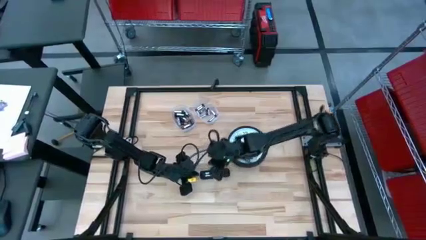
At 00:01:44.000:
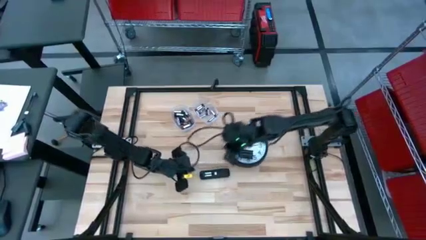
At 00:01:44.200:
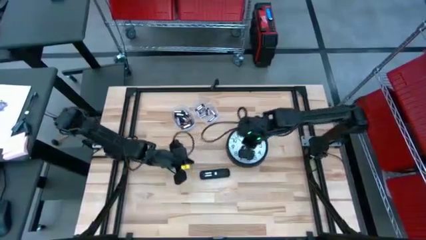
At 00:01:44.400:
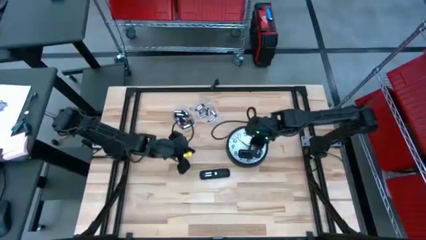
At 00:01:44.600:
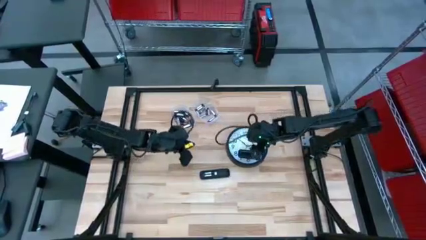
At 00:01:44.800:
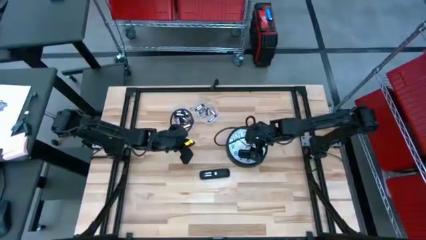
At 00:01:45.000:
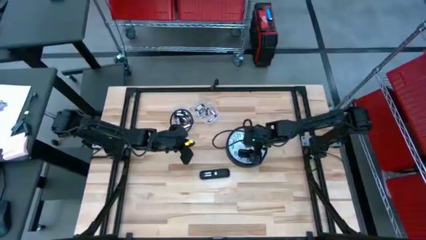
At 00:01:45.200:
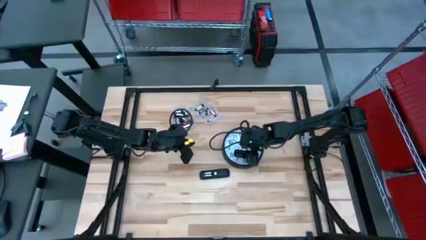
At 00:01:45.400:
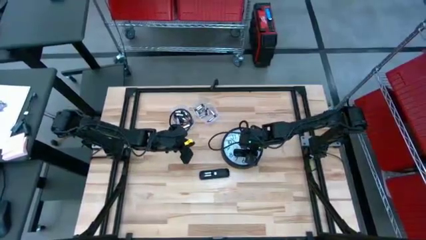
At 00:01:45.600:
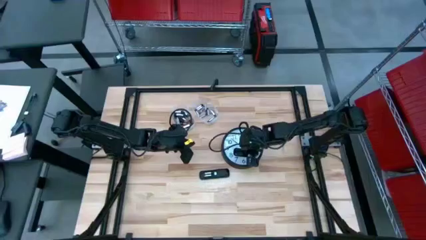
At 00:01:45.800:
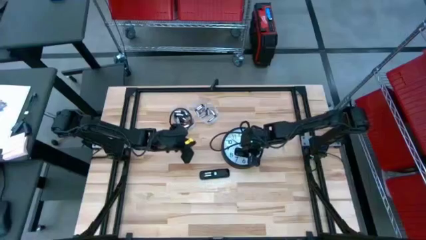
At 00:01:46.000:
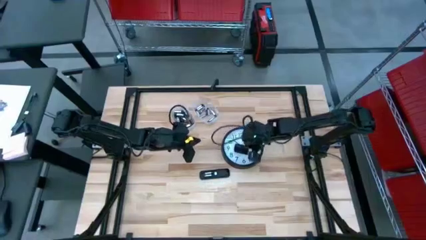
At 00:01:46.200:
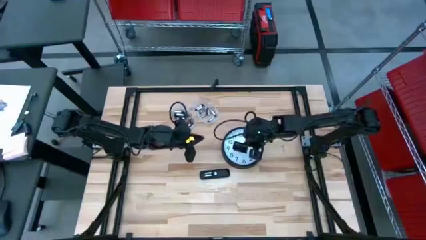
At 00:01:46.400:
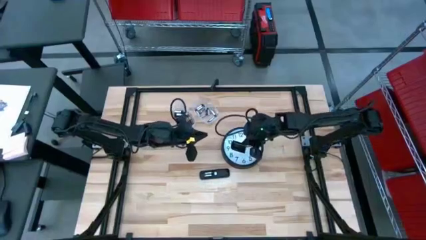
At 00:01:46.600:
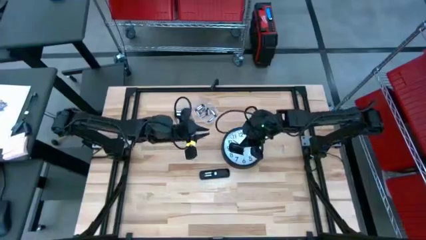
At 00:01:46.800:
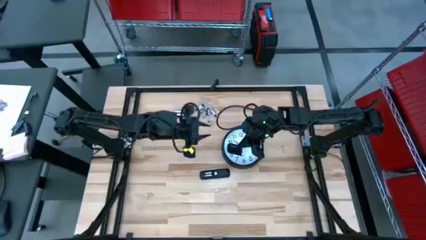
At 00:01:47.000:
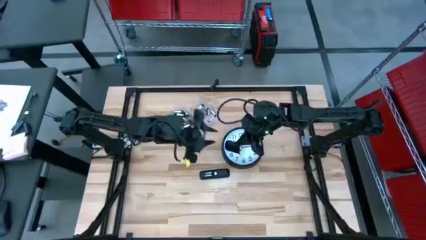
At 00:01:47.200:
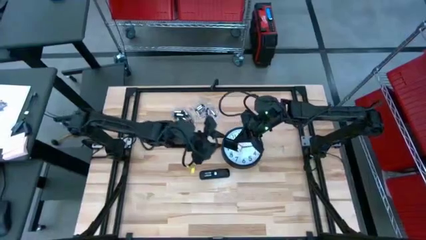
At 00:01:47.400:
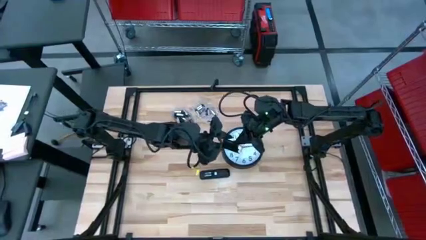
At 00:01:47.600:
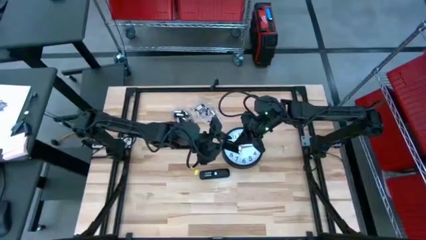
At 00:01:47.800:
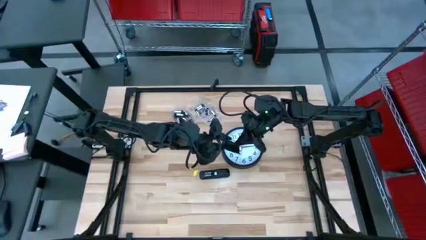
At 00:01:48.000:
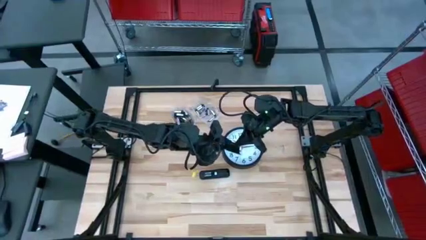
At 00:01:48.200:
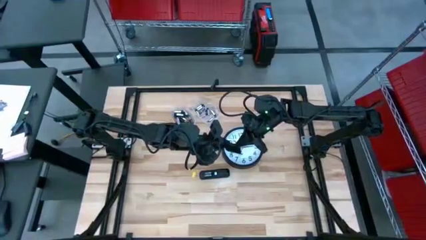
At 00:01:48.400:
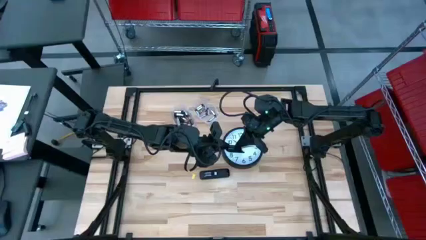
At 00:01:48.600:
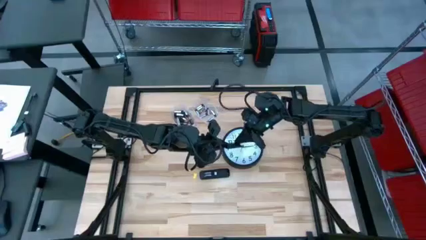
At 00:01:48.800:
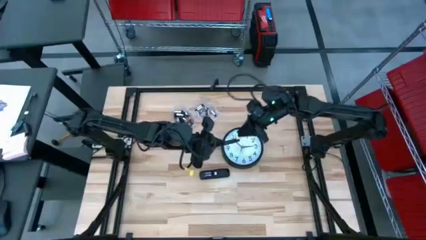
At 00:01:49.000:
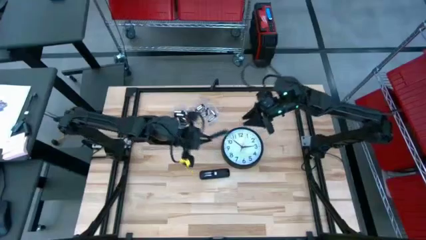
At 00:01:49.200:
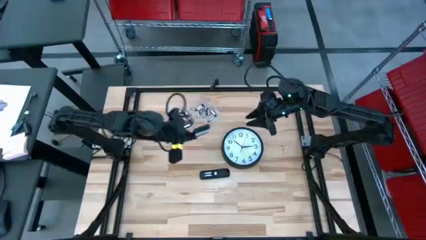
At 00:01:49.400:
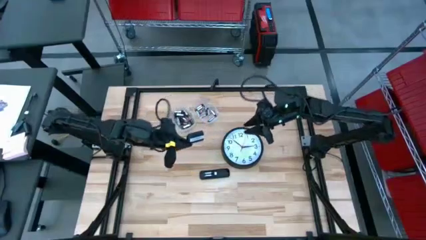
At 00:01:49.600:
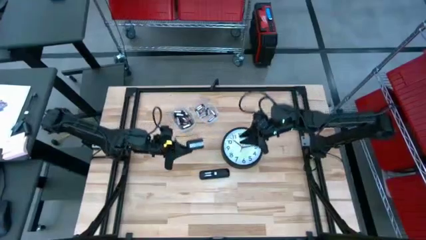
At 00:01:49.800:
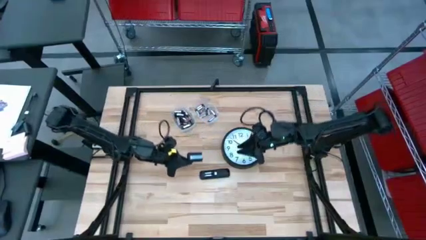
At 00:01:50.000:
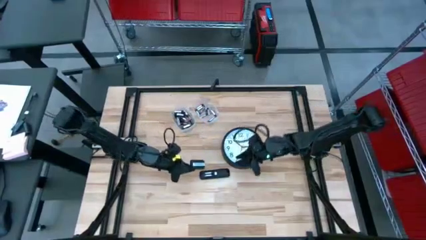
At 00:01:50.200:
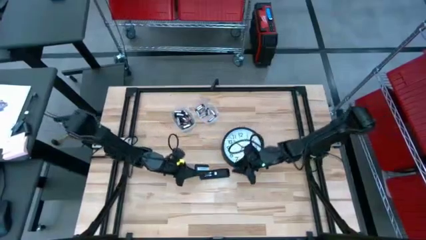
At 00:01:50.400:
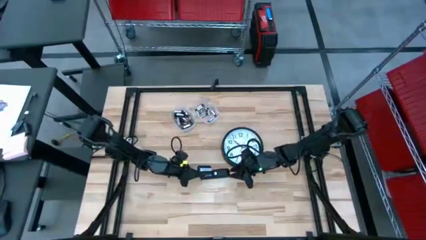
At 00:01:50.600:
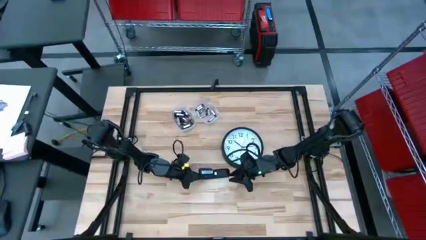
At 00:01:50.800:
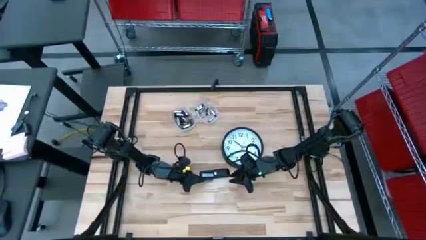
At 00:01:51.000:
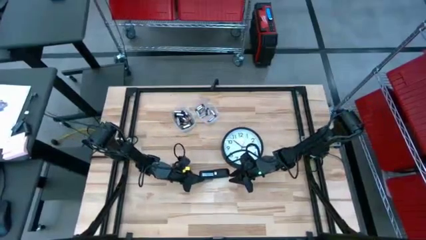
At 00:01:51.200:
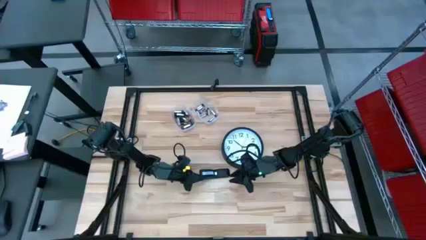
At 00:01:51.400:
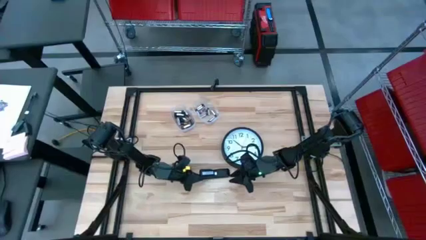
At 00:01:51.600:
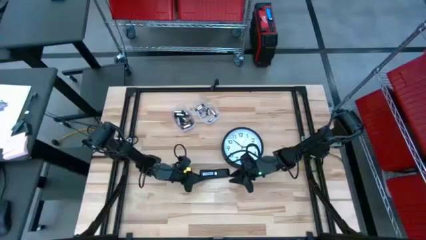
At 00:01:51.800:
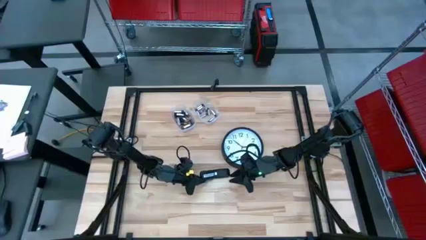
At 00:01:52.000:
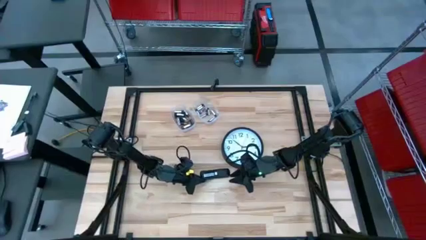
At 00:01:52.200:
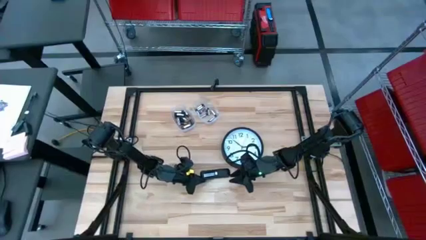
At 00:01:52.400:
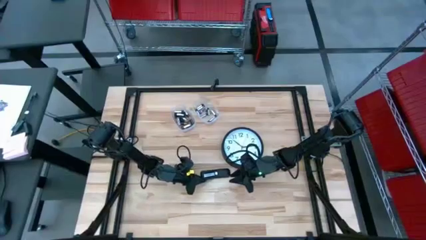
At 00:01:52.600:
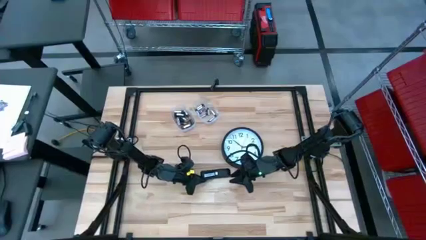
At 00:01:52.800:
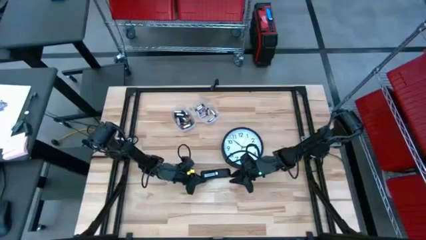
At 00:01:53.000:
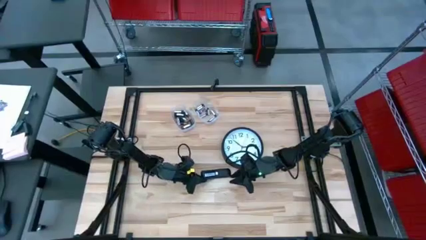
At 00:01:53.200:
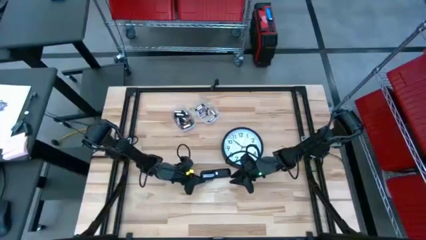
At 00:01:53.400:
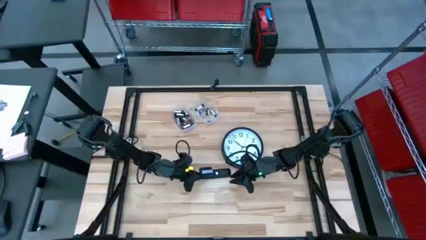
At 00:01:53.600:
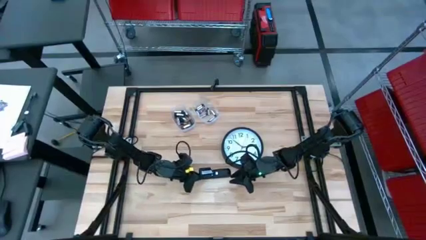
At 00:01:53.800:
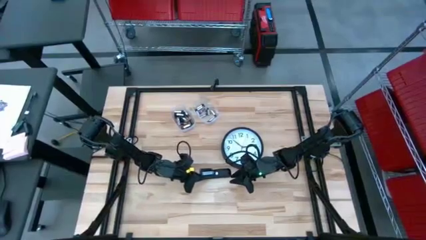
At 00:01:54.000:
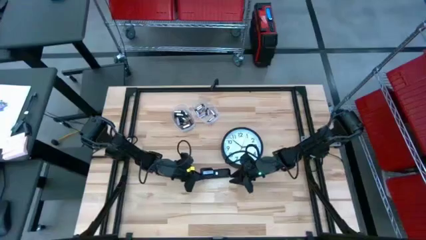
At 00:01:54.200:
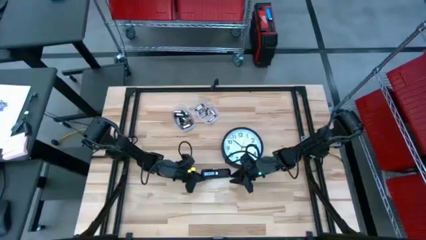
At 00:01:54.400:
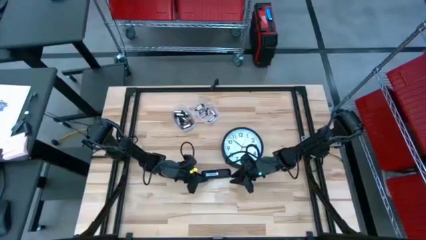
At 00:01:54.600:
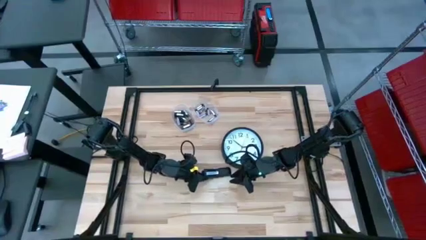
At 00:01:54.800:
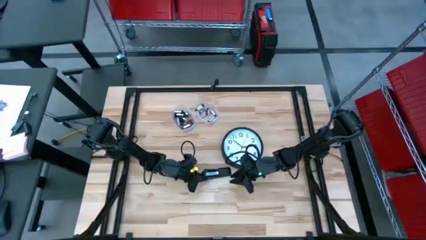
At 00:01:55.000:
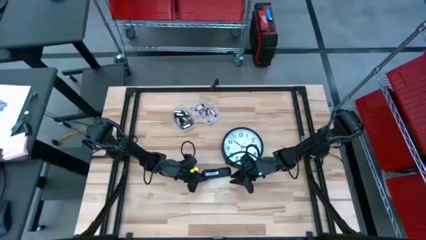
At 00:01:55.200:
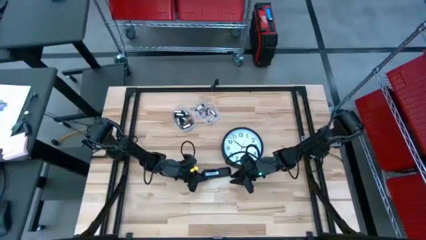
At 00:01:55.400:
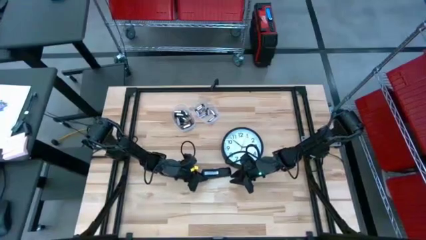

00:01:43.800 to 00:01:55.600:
Task: Insert battery
Close the remote battery cover
